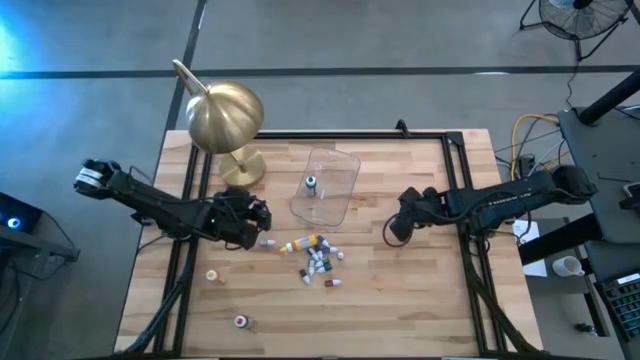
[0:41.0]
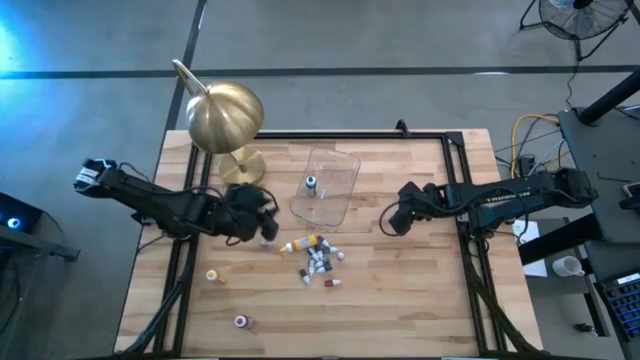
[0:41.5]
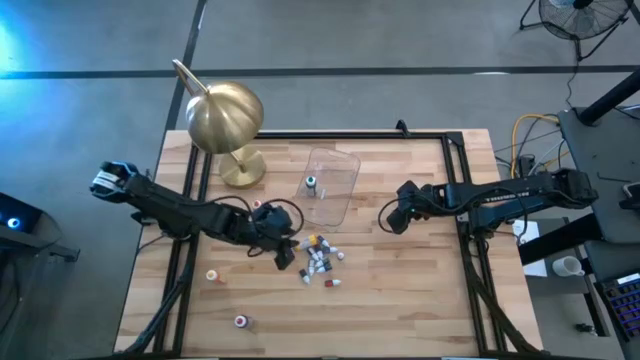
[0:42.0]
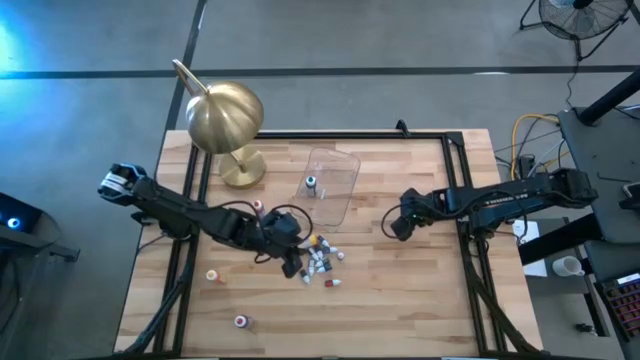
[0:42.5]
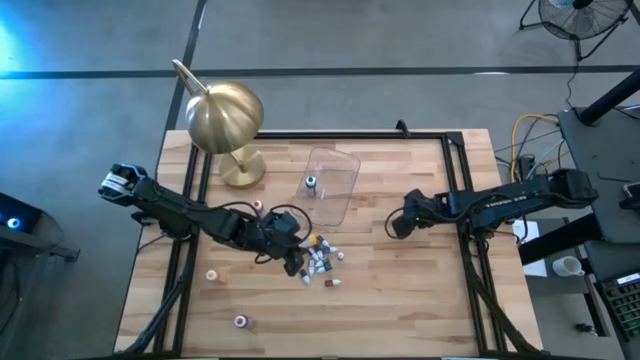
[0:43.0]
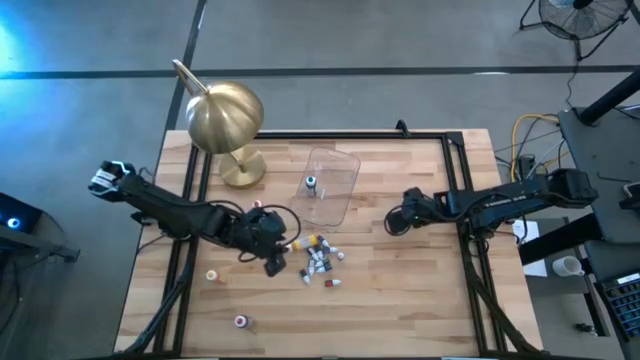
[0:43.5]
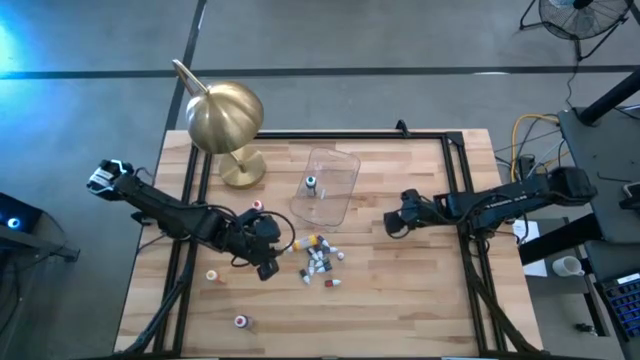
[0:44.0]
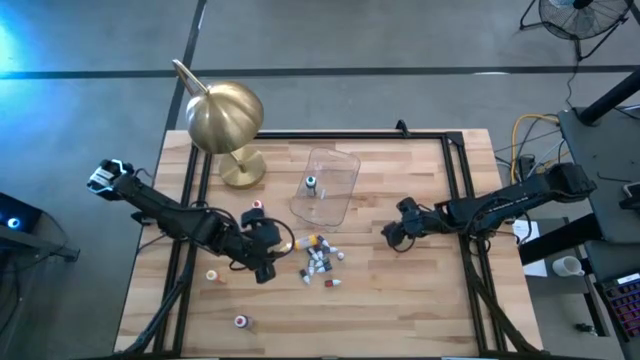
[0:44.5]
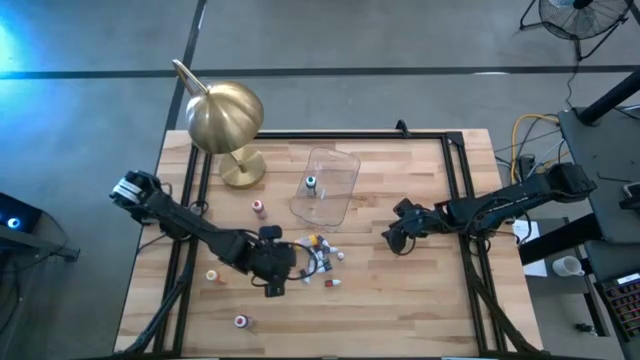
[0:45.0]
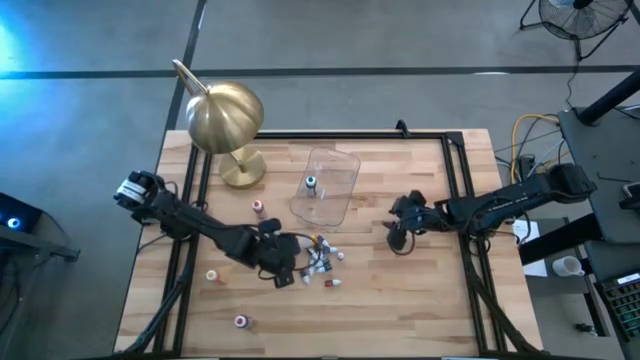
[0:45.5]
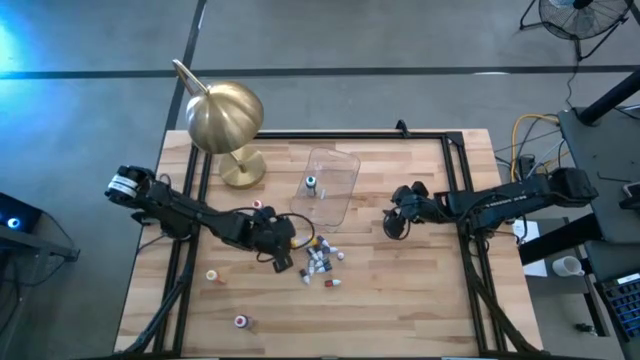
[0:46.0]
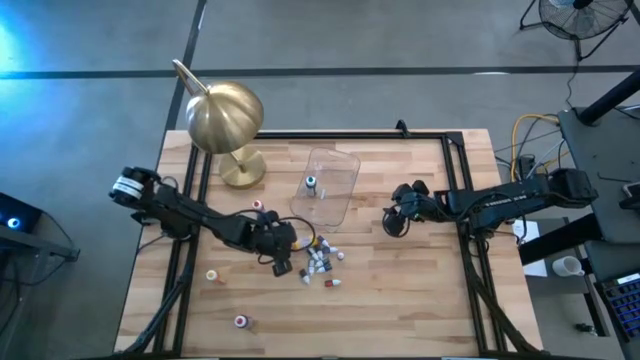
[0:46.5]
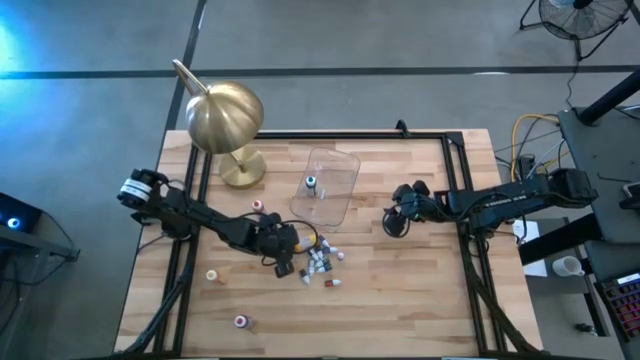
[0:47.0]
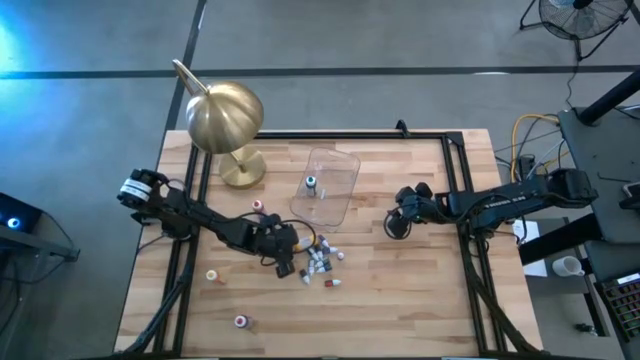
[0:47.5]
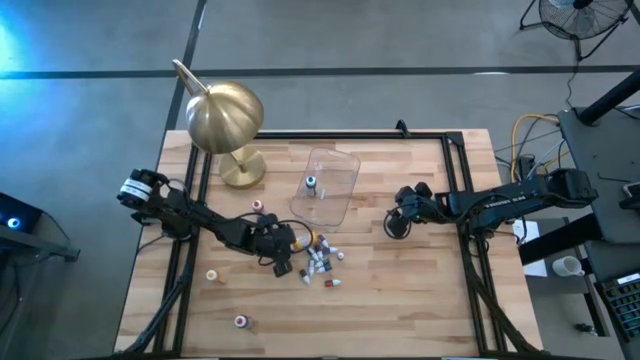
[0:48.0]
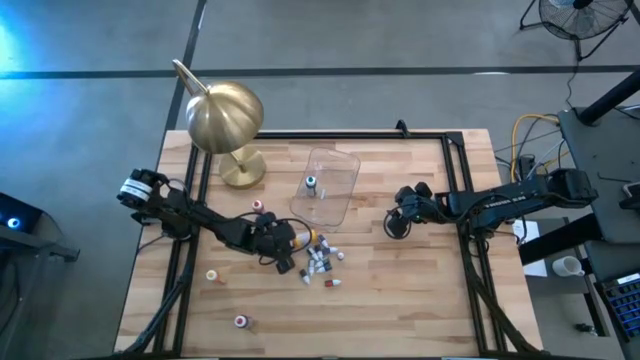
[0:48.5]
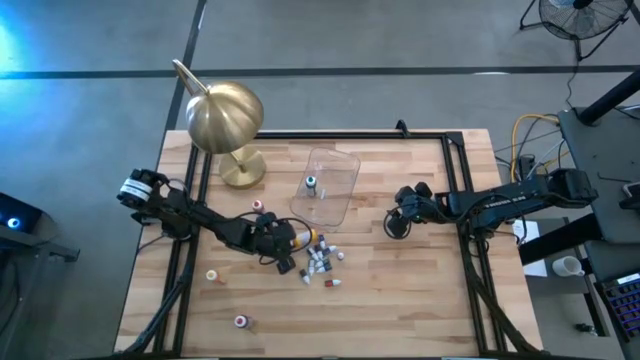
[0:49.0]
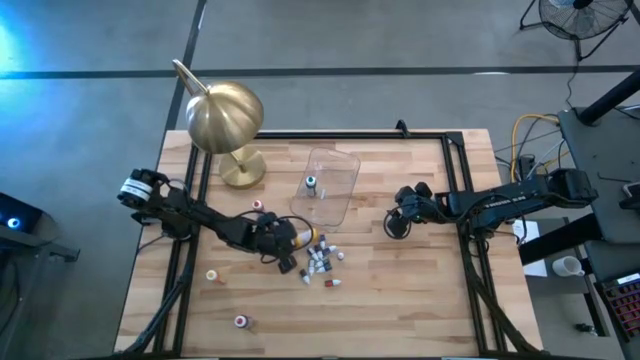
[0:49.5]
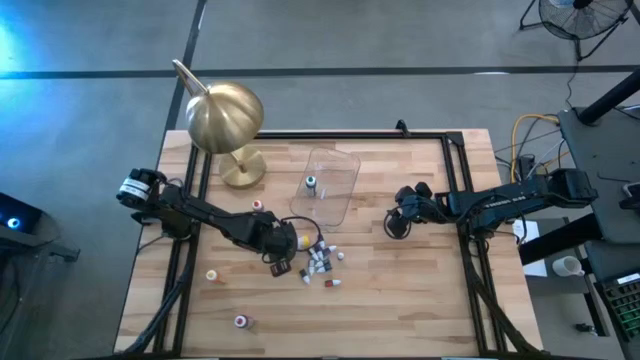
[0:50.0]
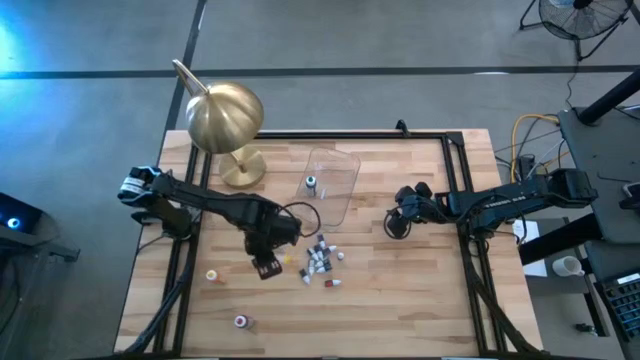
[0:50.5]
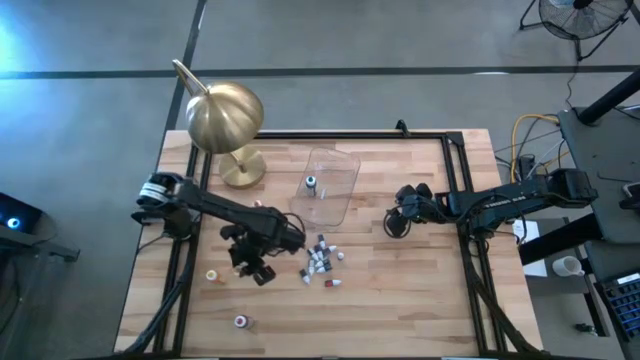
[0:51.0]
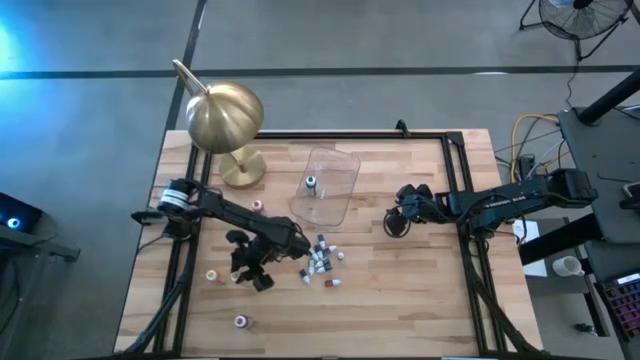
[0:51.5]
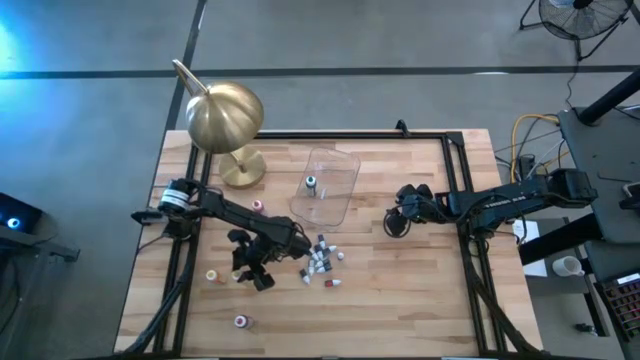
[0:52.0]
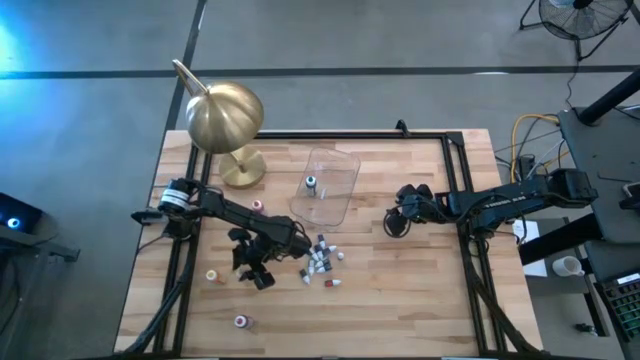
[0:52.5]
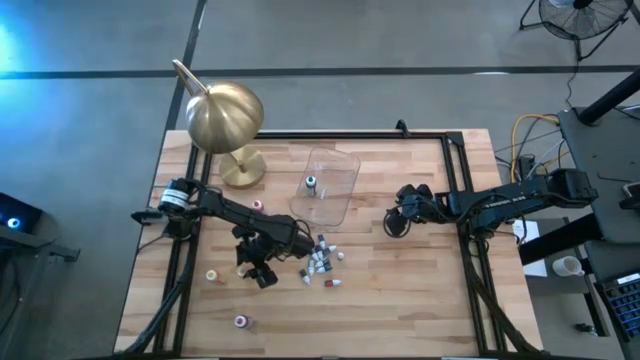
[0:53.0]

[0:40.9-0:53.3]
Task: Pick & Place food coloring
Move the large yellow food coloring bottle to the lower left of the table

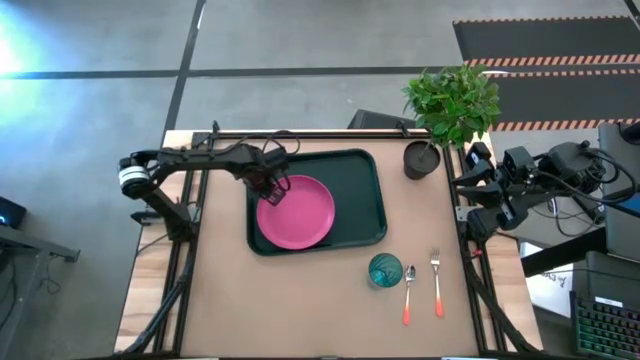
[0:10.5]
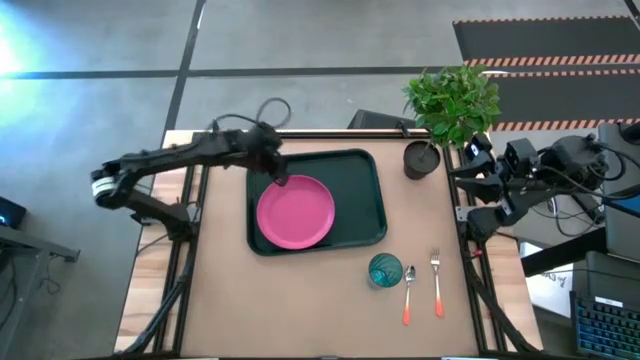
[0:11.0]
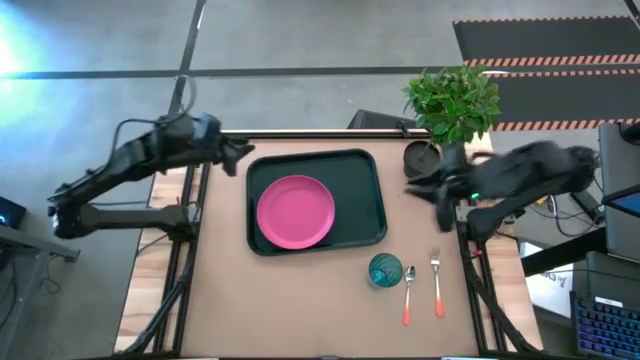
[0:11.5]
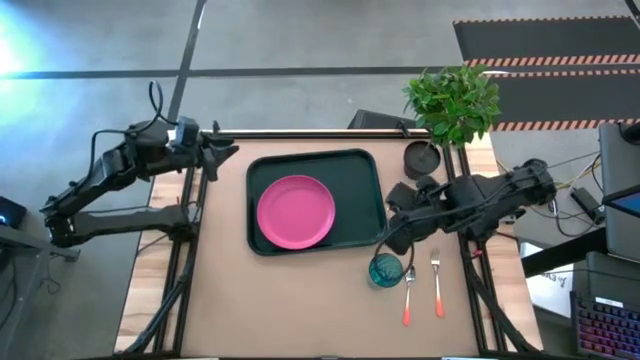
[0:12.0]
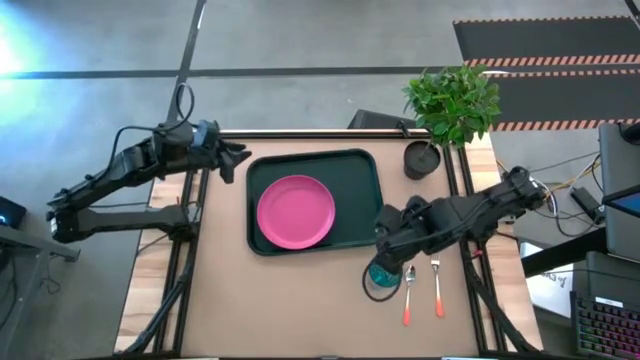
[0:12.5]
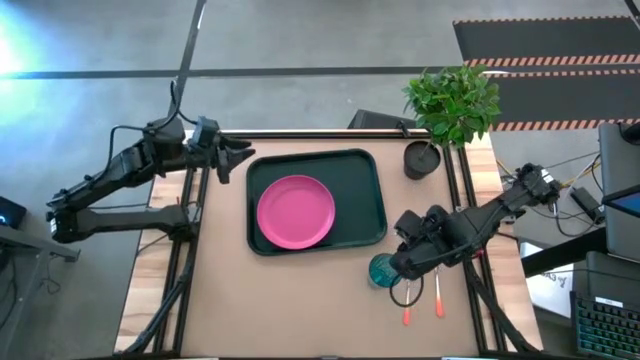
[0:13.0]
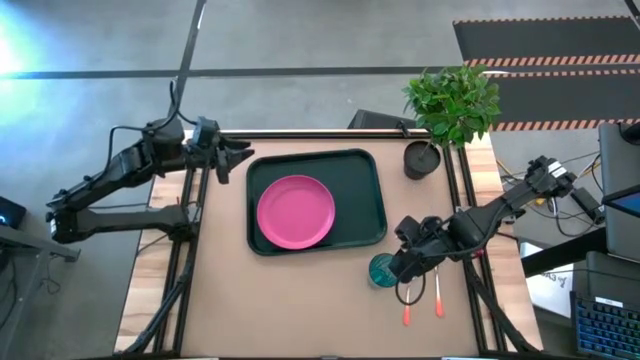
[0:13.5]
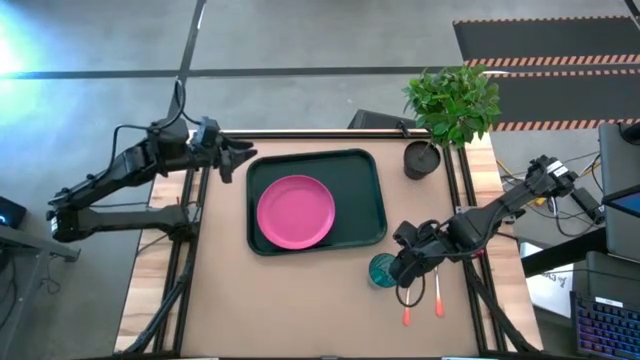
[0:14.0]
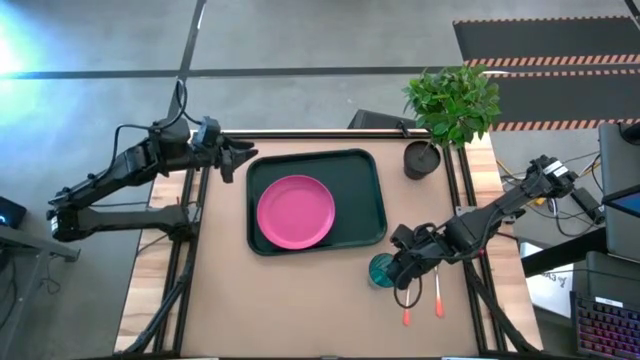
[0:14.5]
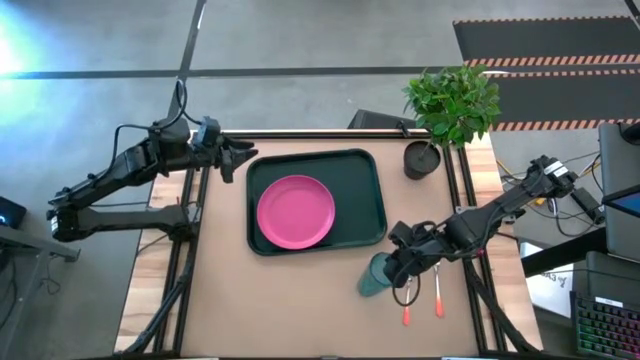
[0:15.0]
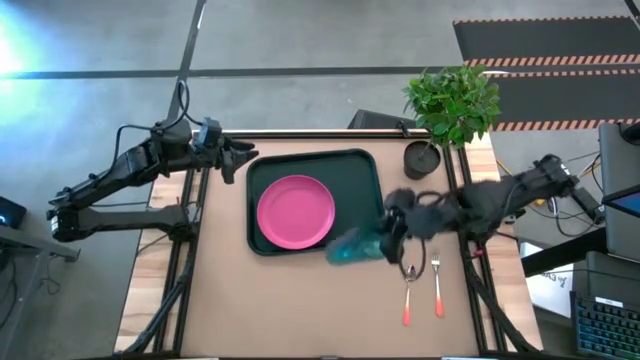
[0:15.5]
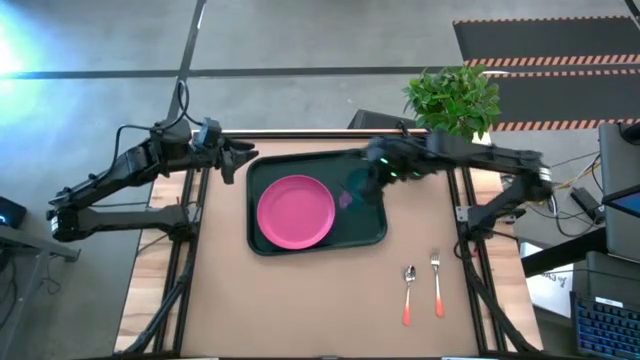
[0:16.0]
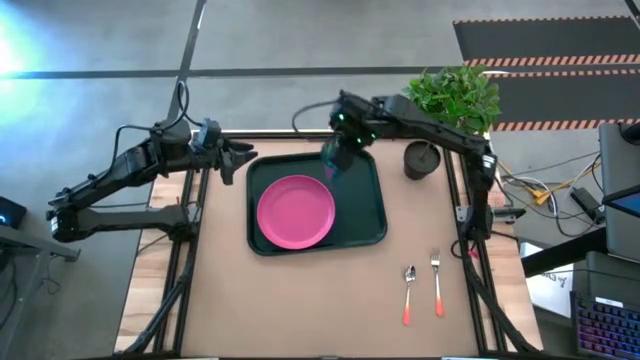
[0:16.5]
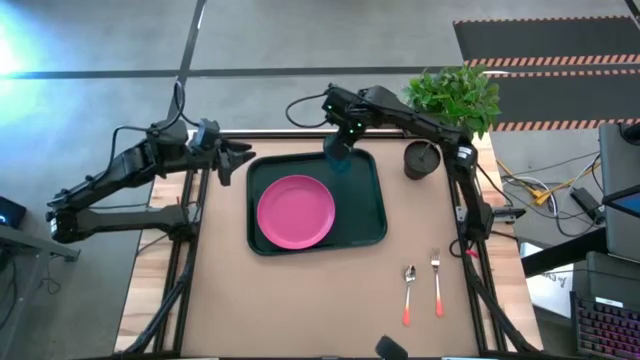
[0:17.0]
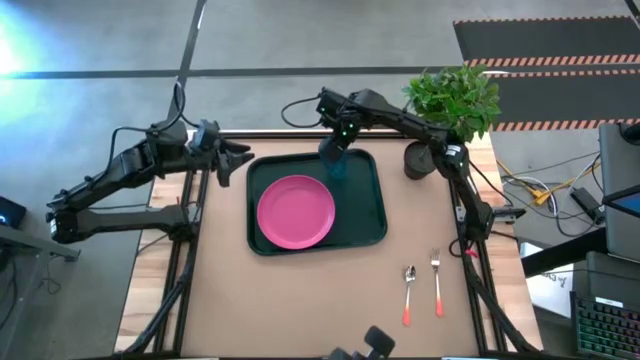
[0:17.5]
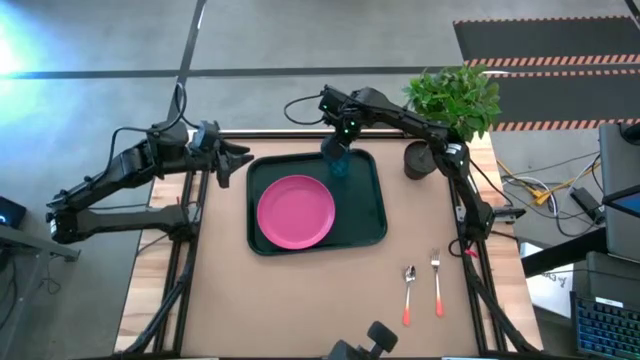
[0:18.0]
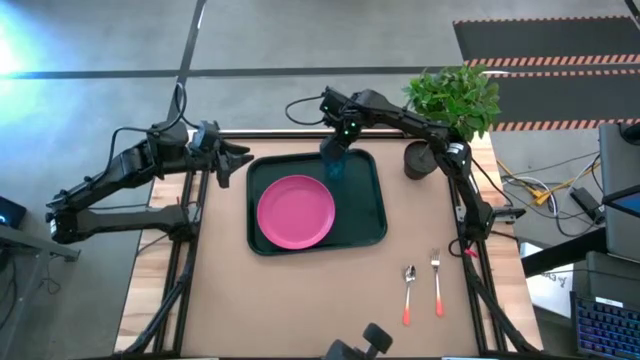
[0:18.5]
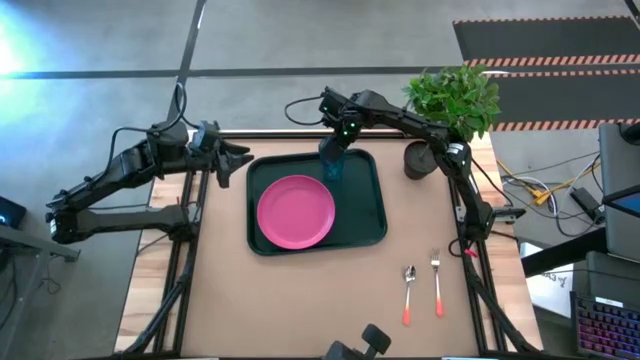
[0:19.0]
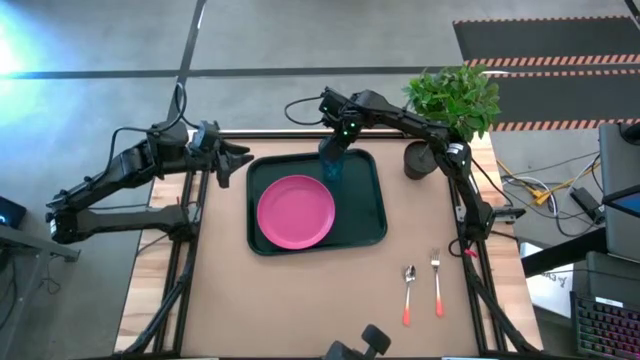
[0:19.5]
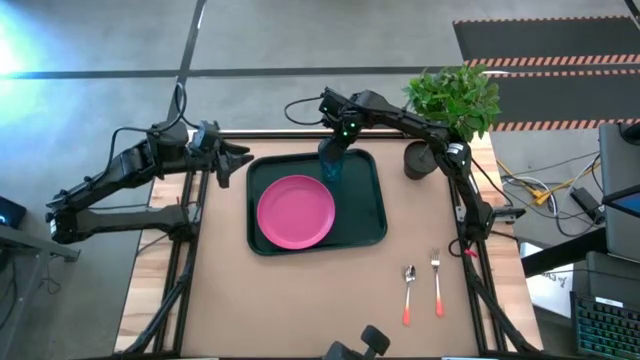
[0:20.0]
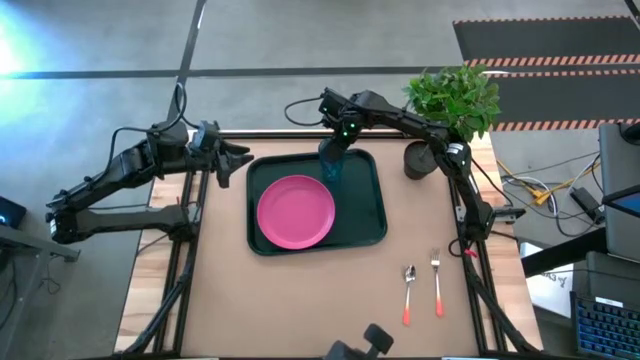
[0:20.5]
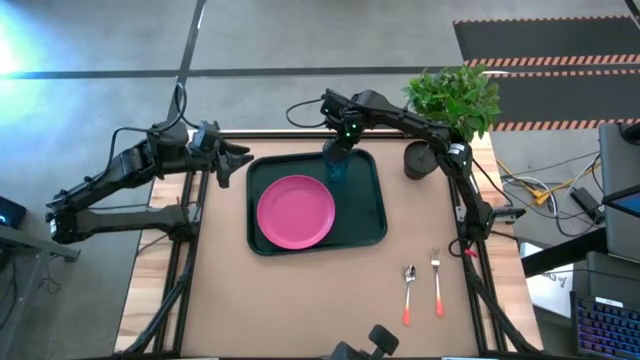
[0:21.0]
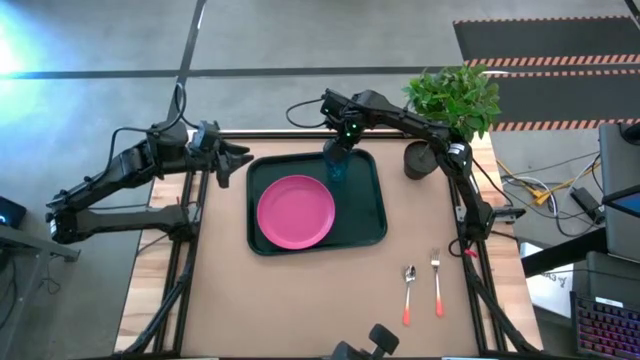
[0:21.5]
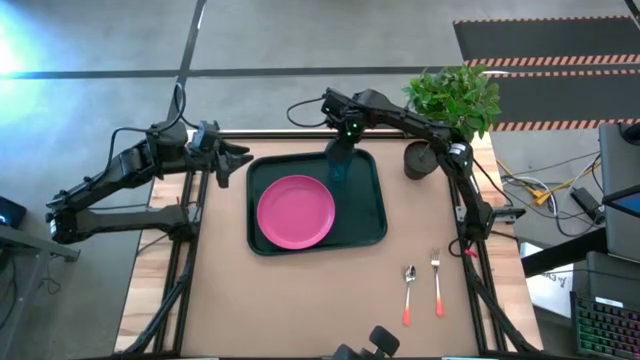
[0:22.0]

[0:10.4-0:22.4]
Task: Pick and place plate/cup/fork/spoon on tray
Put the blue glass on the top right of the black serving tray
